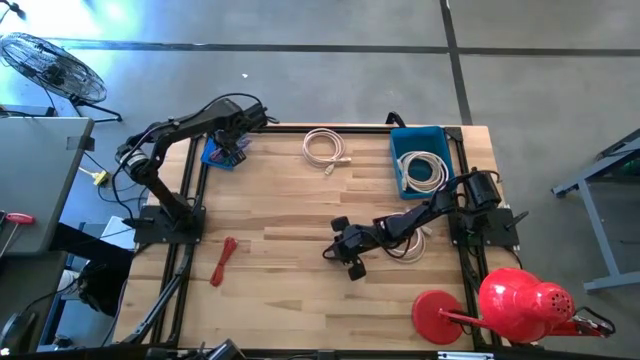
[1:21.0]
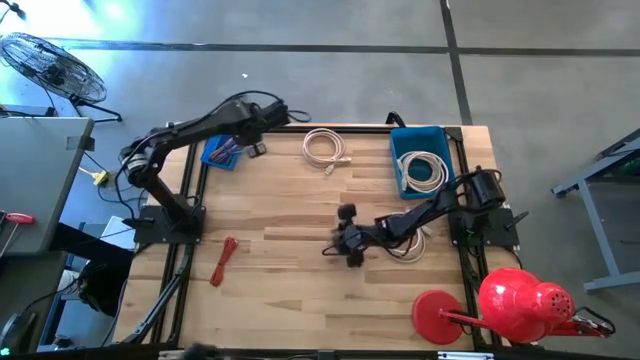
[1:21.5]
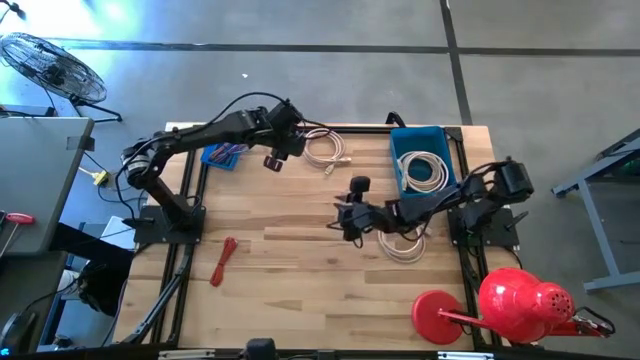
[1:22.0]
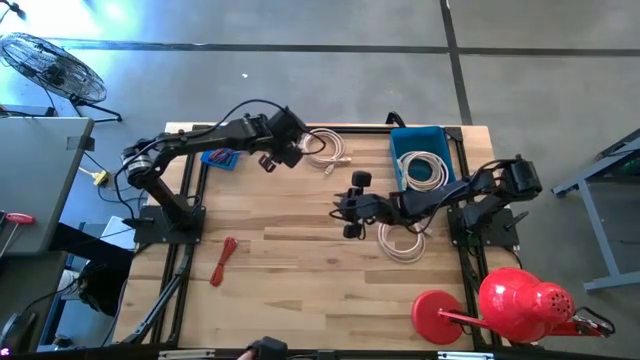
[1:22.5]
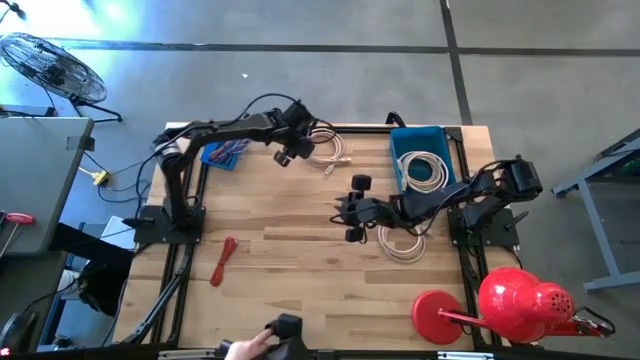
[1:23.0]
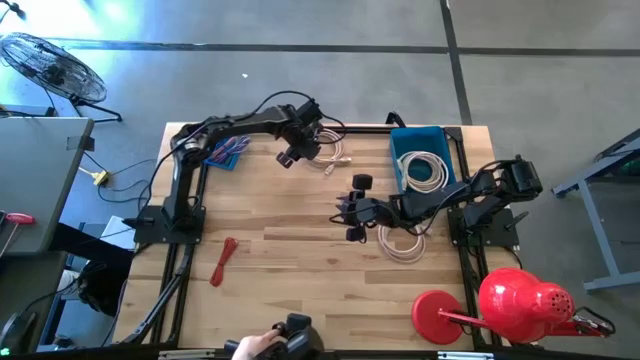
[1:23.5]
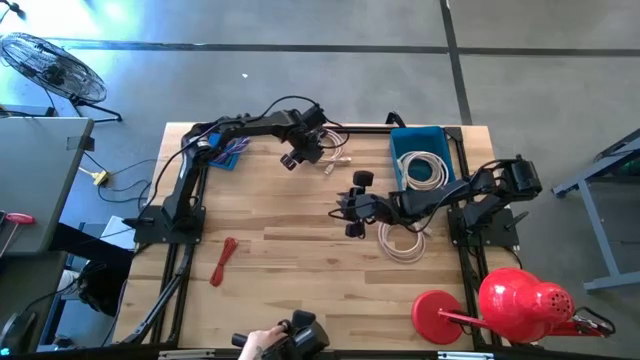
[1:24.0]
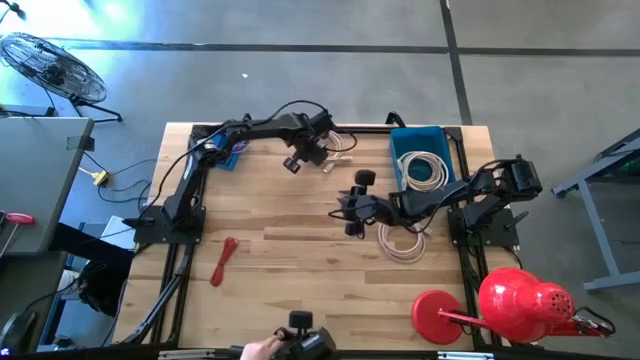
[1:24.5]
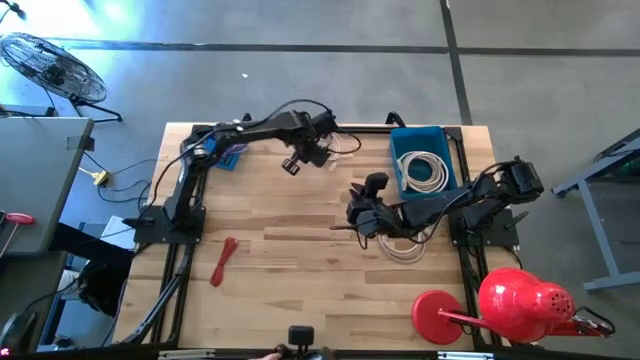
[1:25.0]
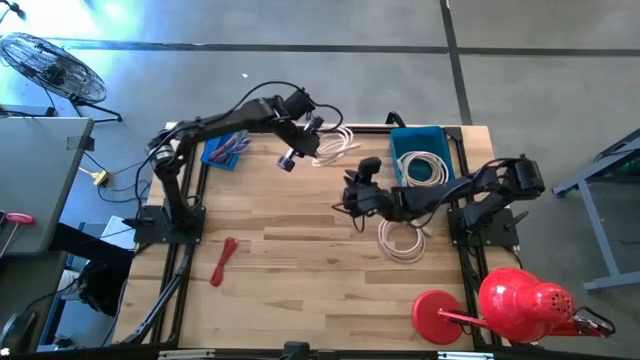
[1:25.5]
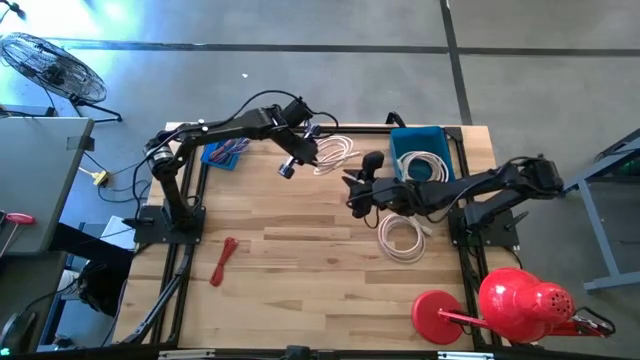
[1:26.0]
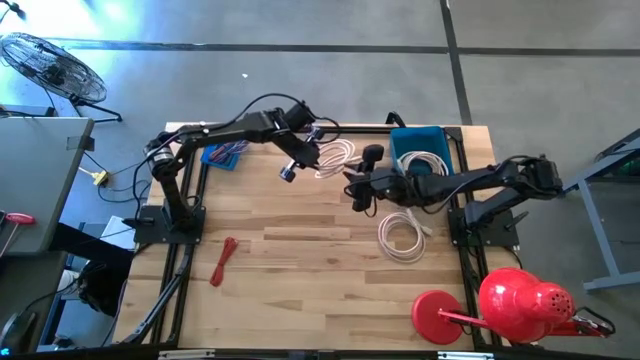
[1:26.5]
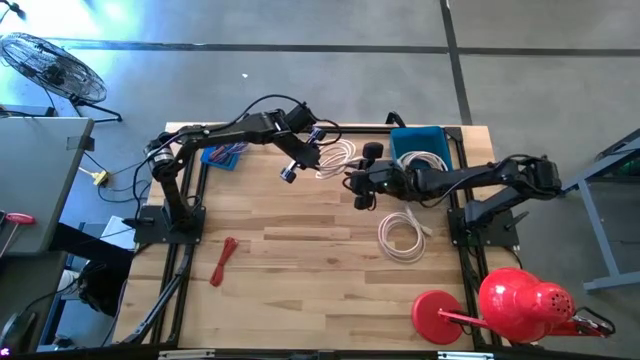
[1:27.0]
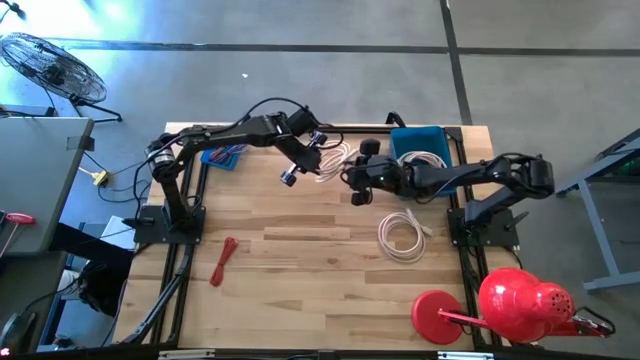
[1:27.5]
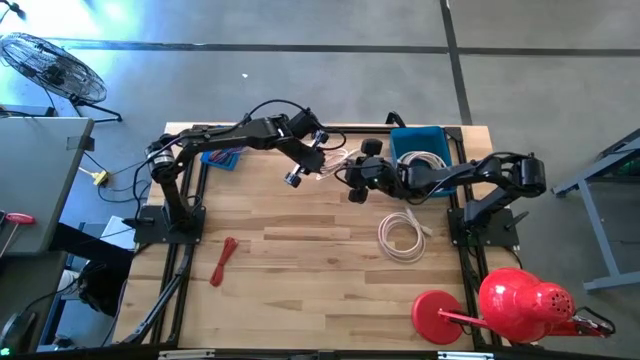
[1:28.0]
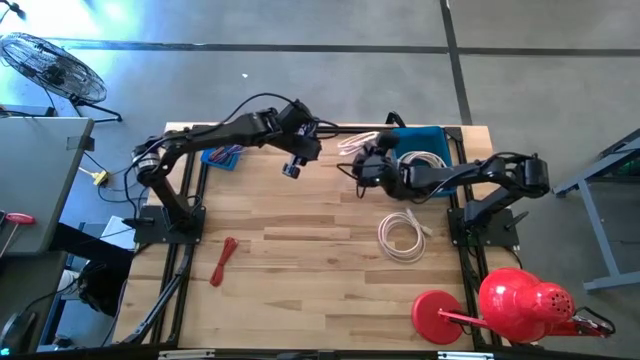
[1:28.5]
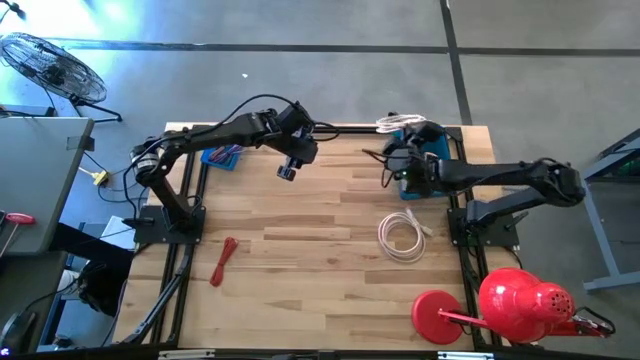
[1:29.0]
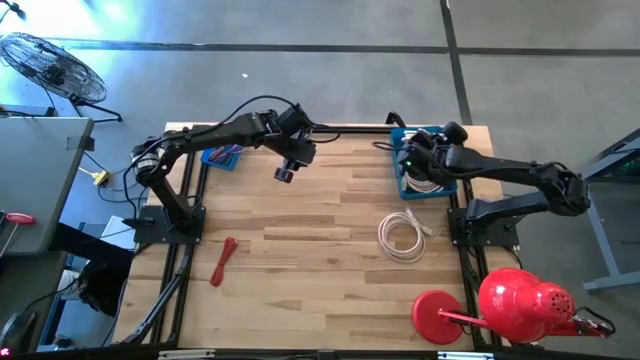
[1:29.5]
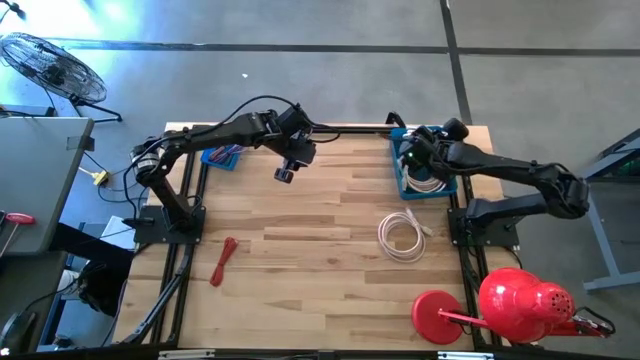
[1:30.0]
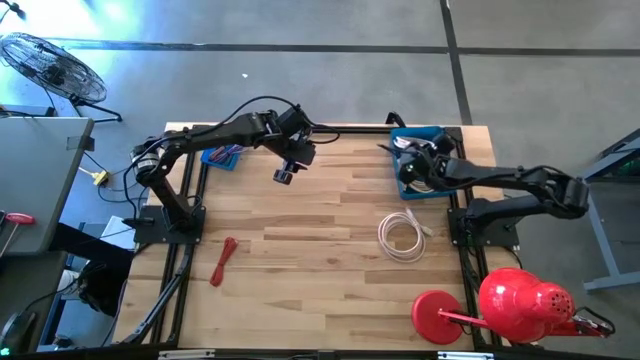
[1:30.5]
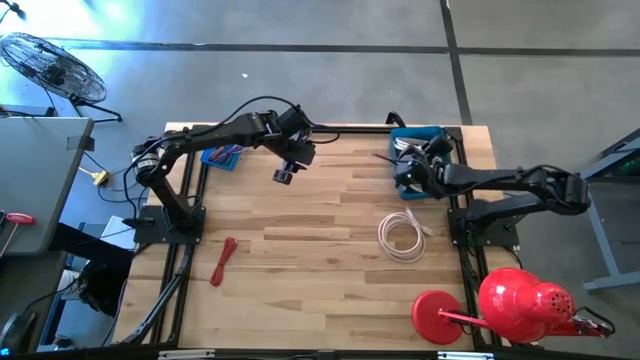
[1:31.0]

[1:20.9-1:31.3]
Task: Pick & Place USB Port
Put the brown HDMI cable into the right blue bin

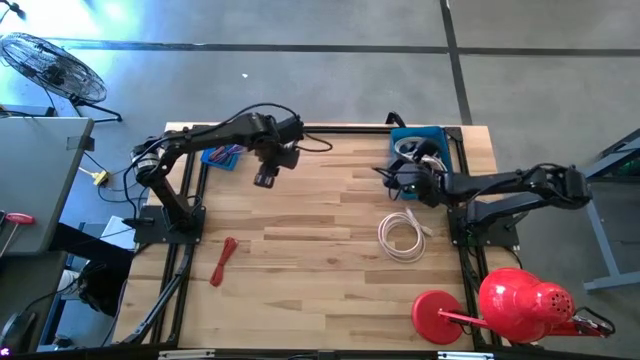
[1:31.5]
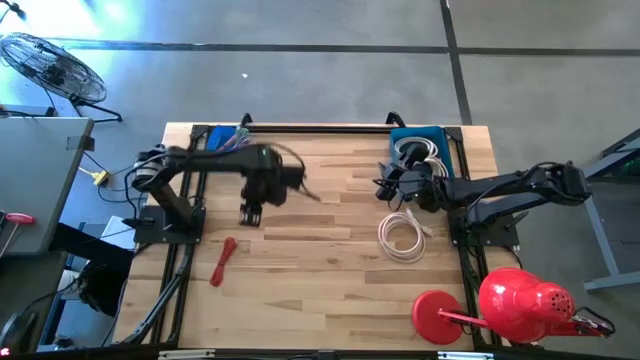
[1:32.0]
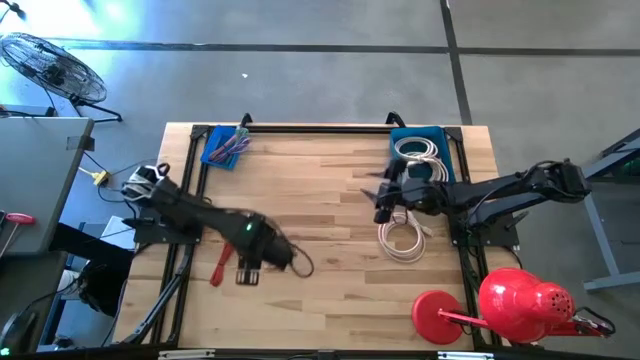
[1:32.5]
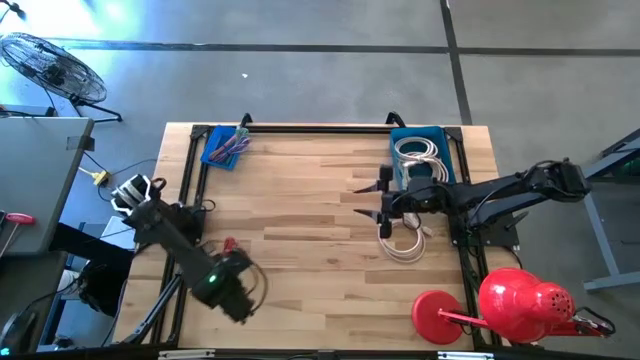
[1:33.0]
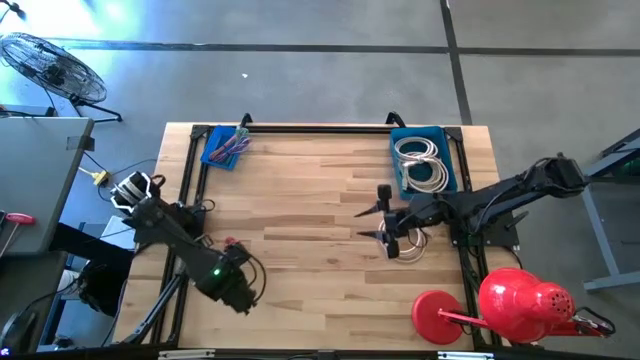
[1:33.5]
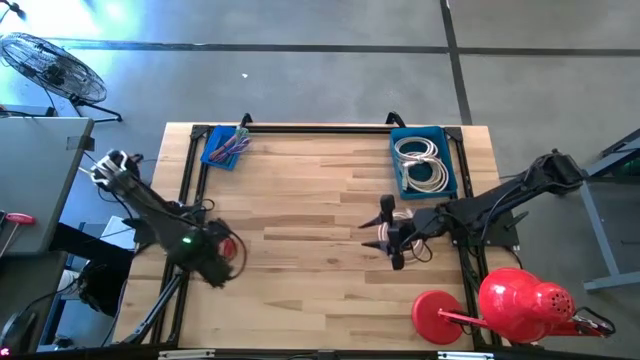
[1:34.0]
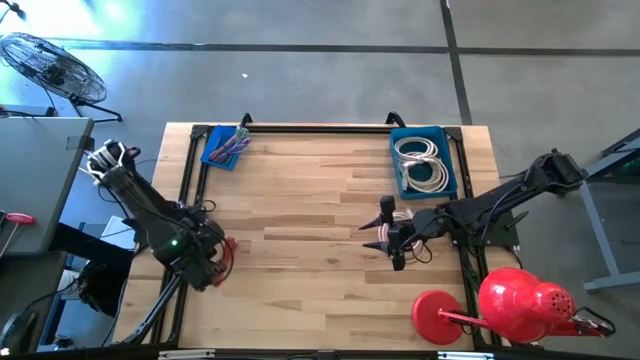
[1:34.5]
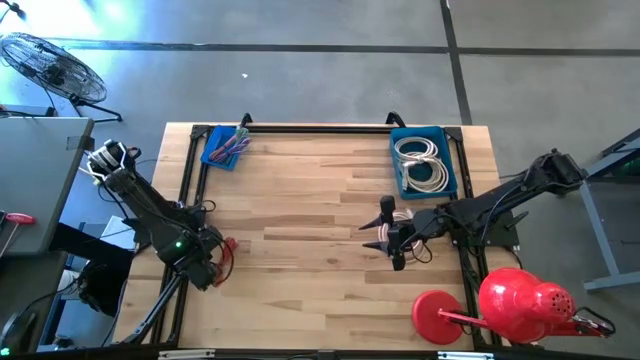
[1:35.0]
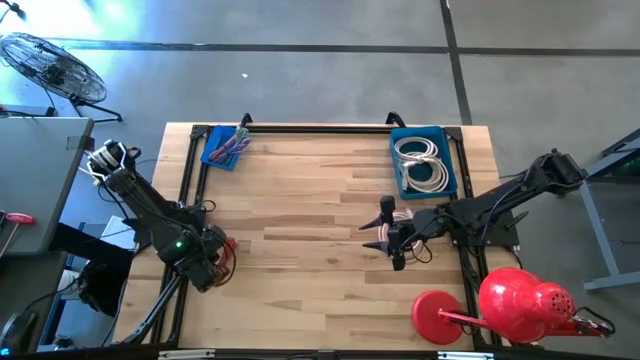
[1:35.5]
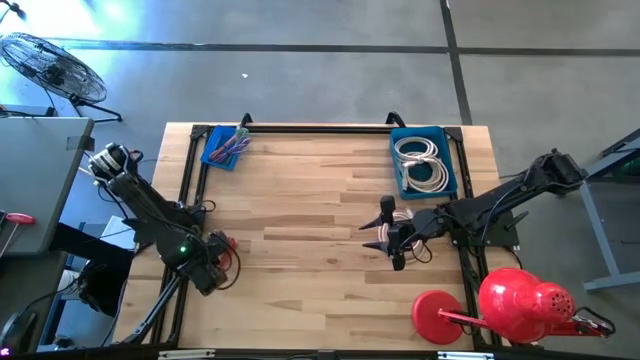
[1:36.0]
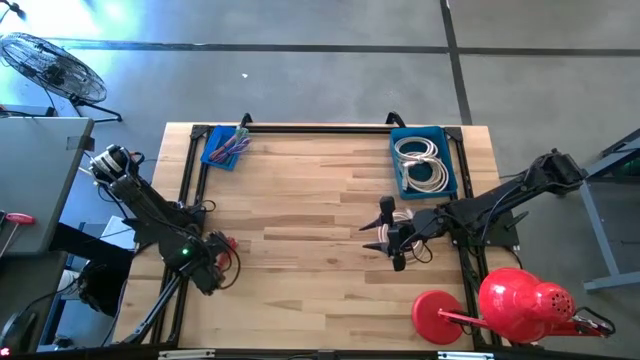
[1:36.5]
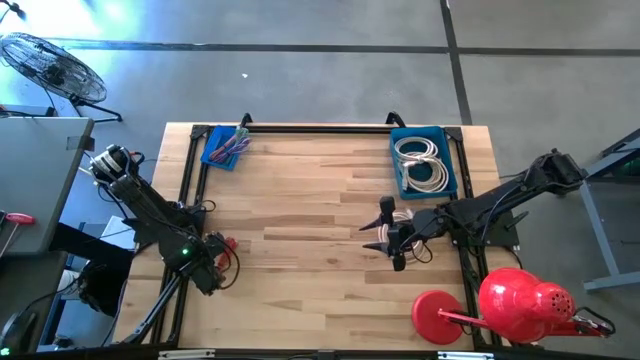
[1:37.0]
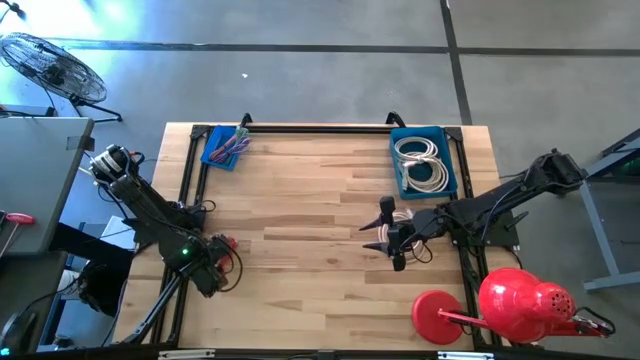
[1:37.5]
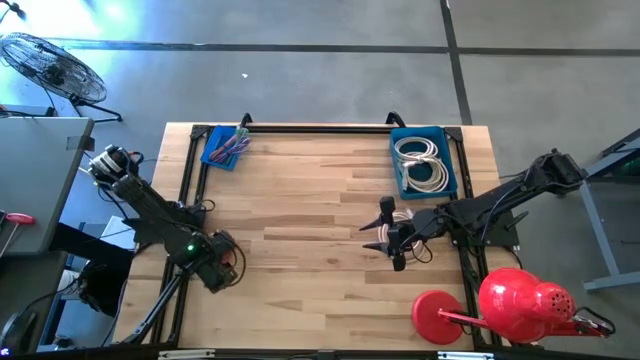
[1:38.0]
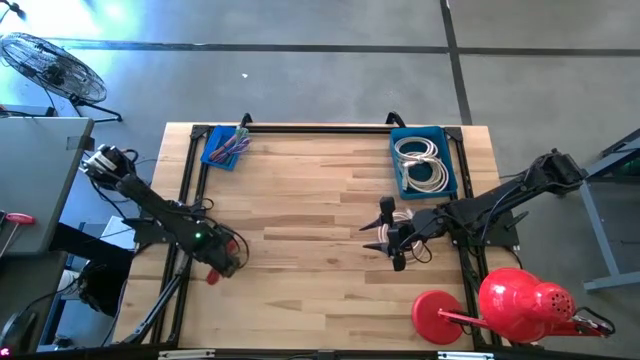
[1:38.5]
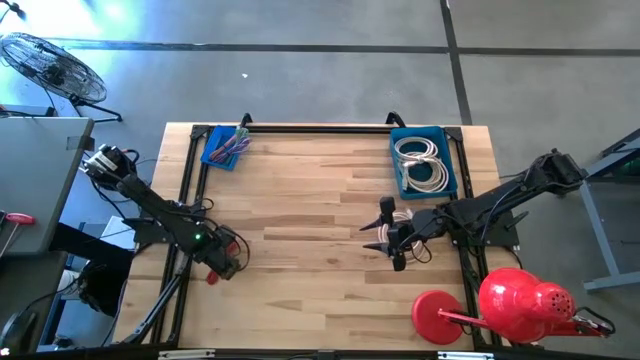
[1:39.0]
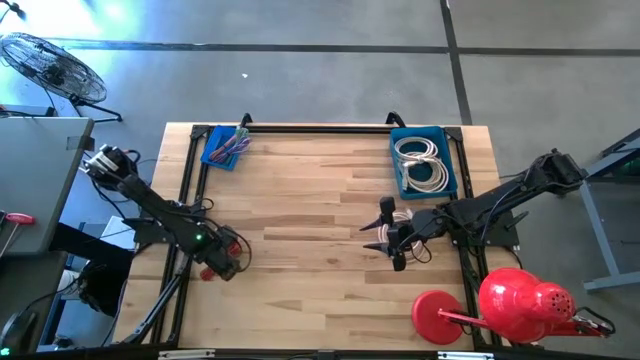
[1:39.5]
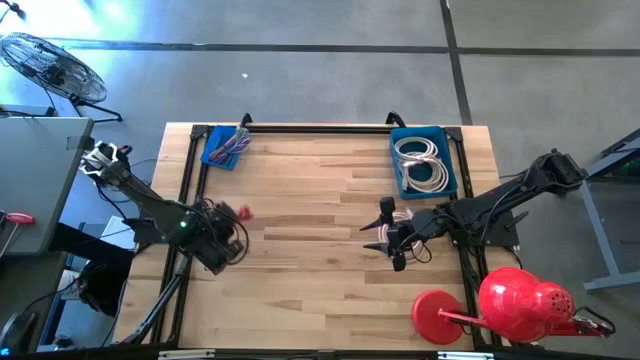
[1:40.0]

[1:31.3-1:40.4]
Put the orange USB cable into the left blue bin

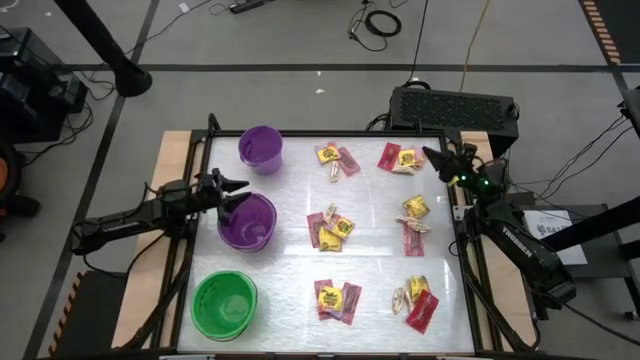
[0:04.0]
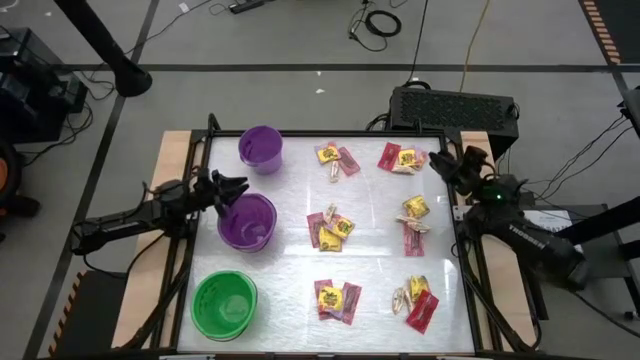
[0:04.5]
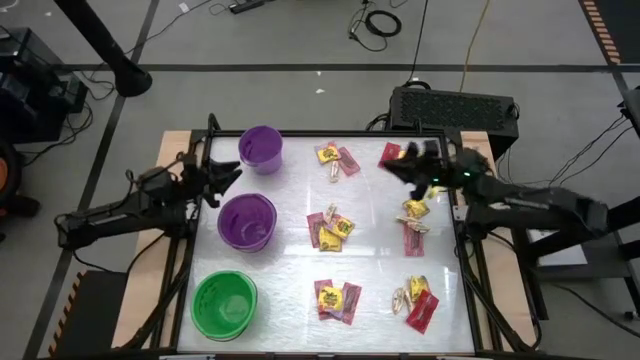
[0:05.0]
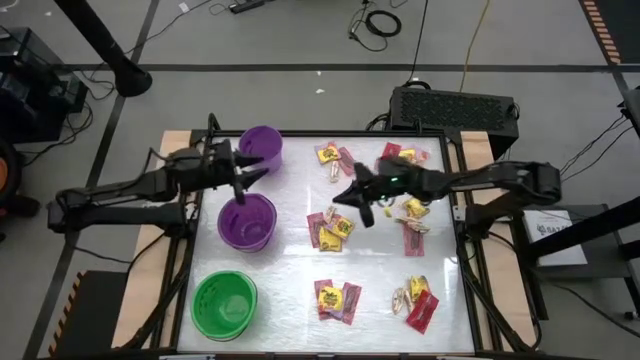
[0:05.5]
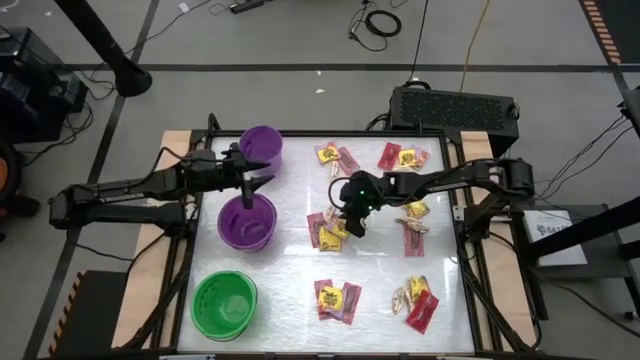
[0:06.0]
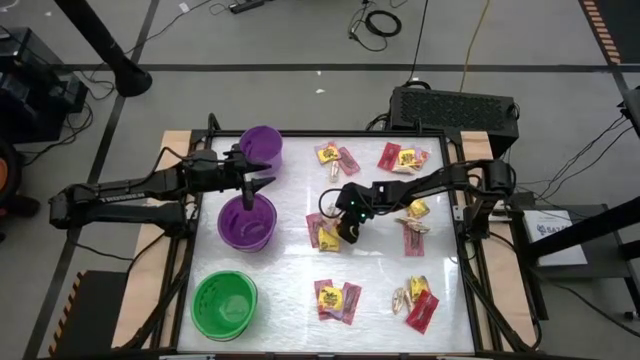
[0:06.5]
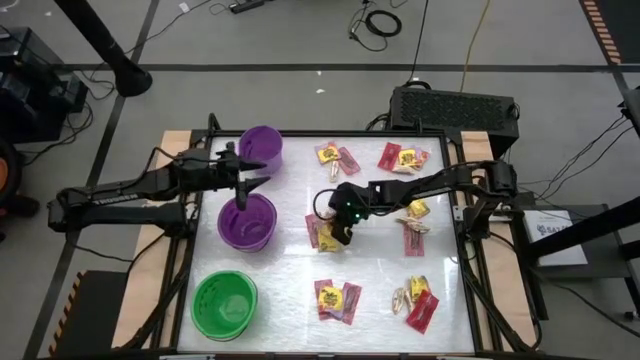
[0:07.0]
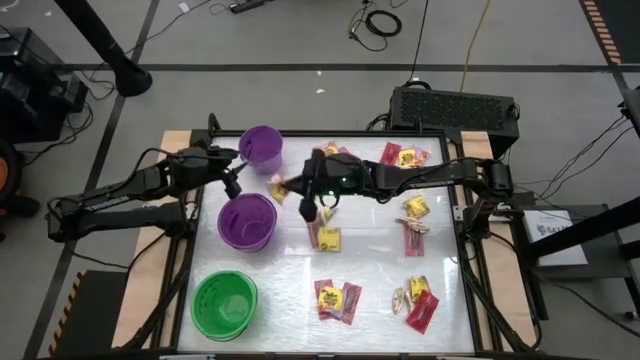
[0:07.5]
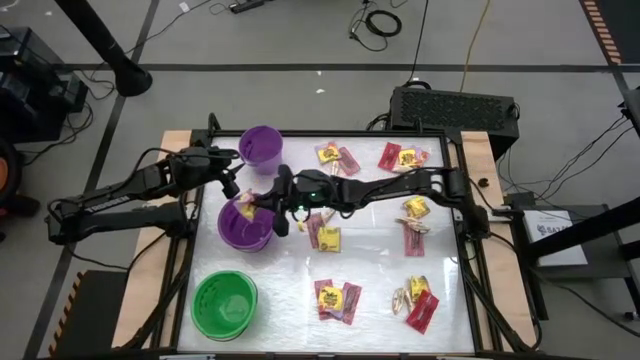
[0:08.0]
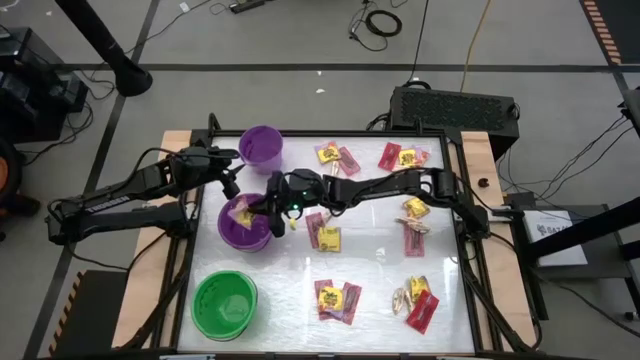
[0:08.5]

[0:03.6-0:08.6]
Task: Sort candy by brand, put in halloween buckets
Put the yellow candy into the bottom purple bucket
